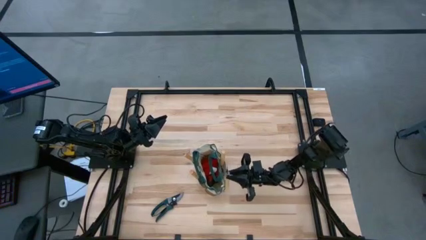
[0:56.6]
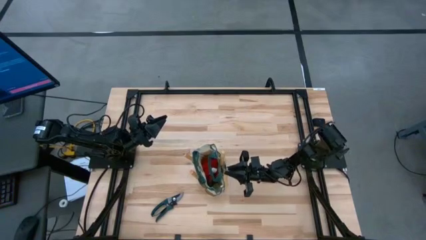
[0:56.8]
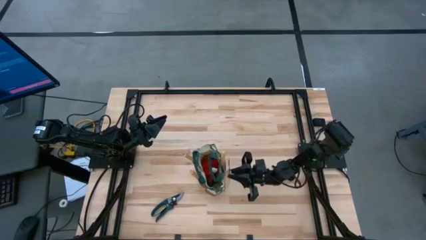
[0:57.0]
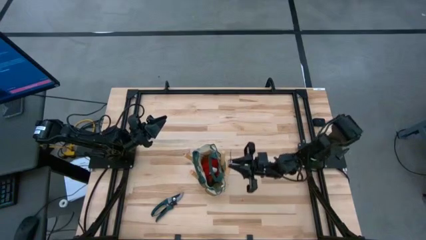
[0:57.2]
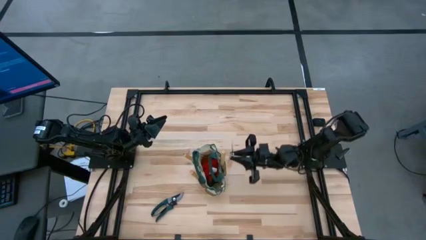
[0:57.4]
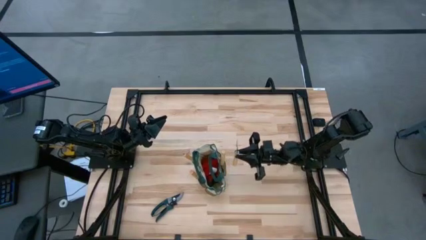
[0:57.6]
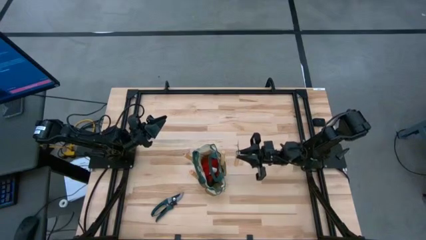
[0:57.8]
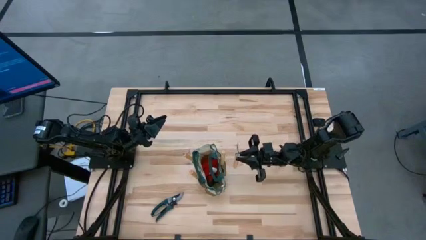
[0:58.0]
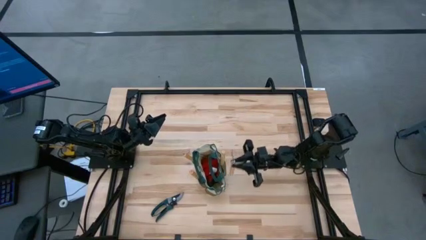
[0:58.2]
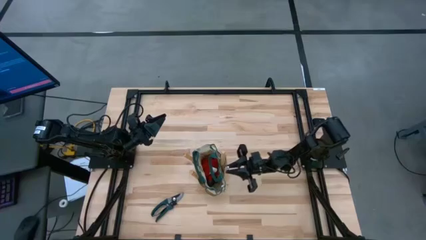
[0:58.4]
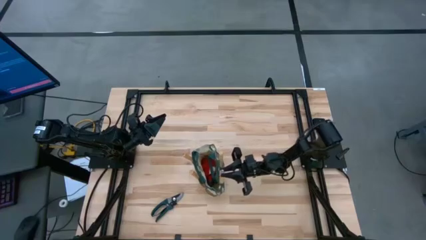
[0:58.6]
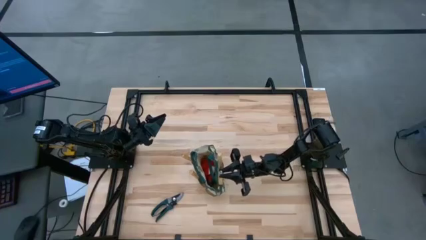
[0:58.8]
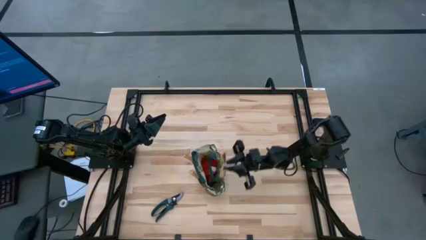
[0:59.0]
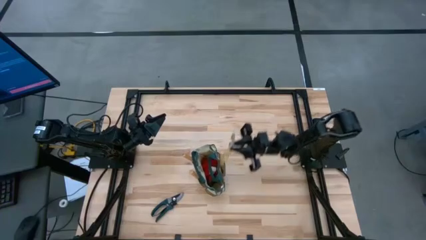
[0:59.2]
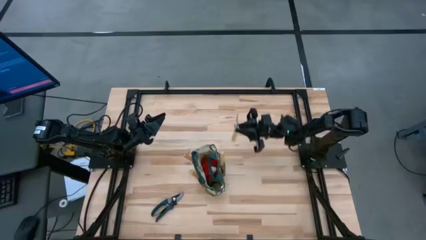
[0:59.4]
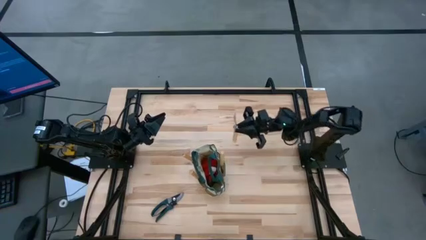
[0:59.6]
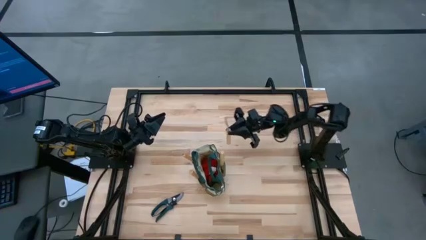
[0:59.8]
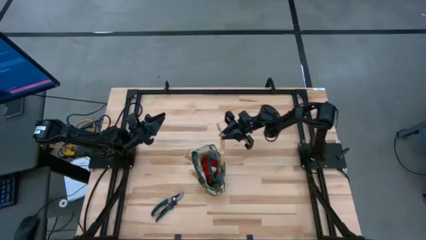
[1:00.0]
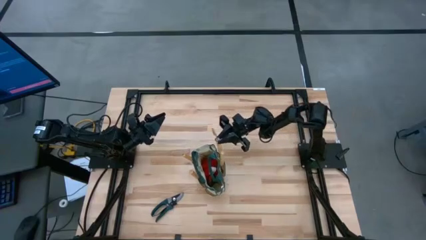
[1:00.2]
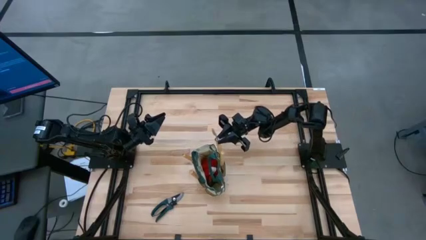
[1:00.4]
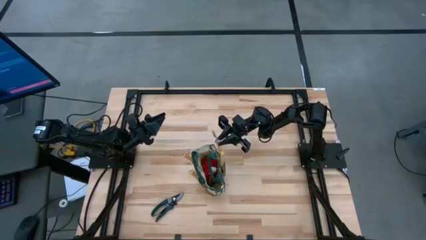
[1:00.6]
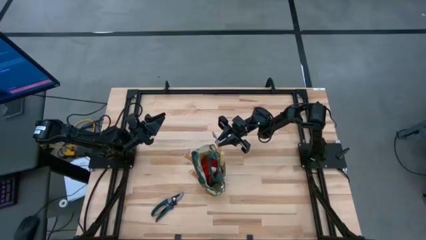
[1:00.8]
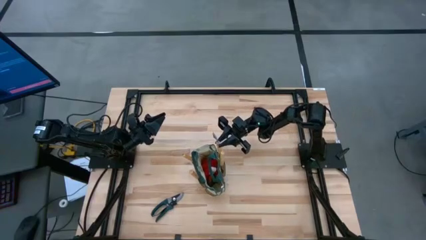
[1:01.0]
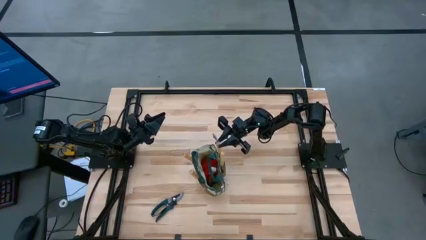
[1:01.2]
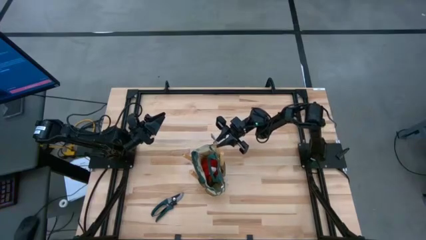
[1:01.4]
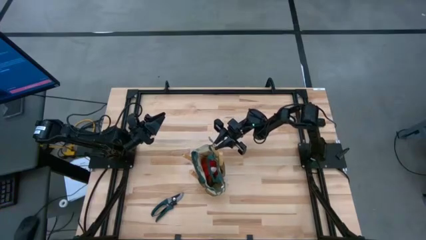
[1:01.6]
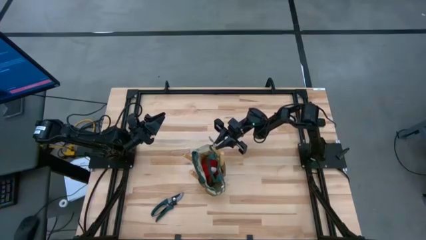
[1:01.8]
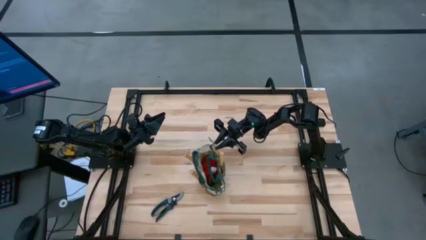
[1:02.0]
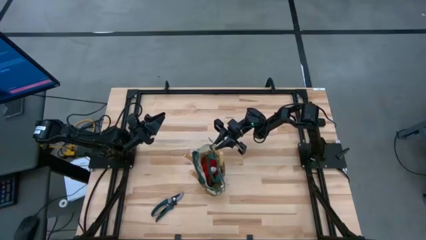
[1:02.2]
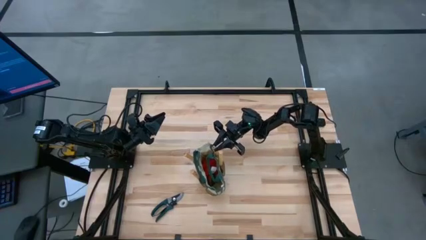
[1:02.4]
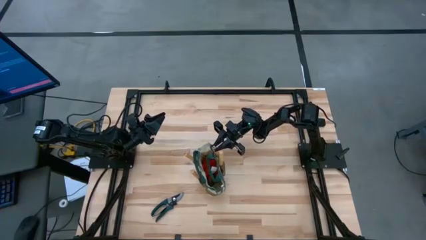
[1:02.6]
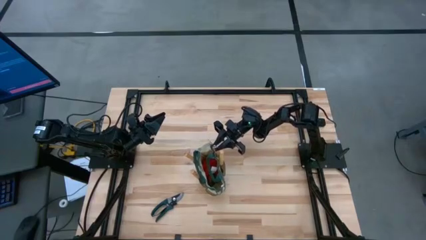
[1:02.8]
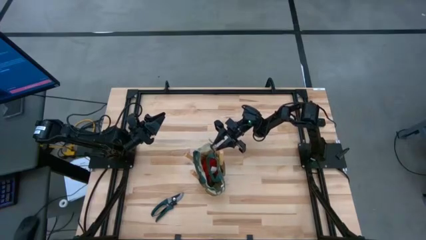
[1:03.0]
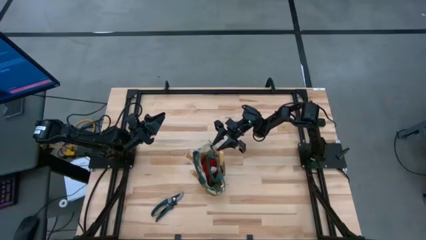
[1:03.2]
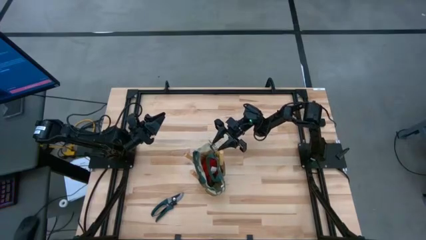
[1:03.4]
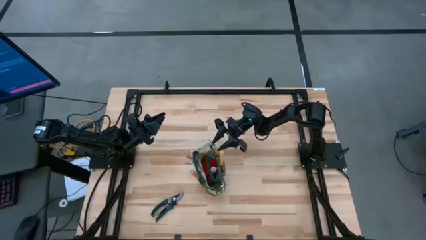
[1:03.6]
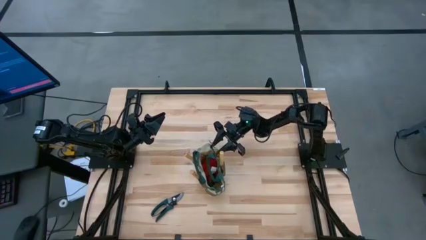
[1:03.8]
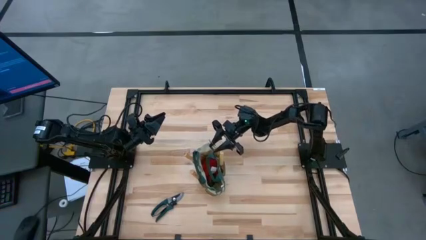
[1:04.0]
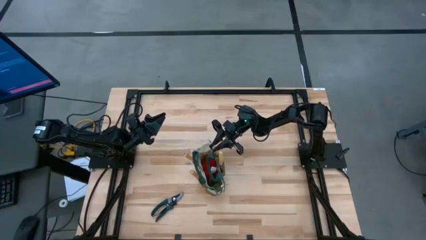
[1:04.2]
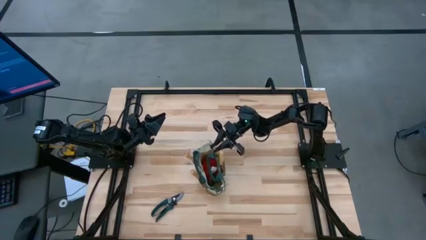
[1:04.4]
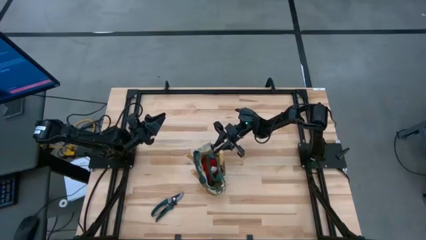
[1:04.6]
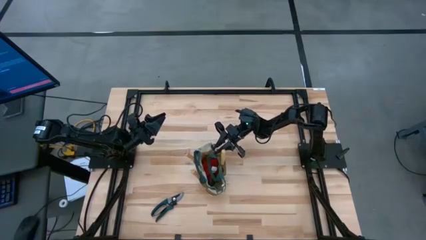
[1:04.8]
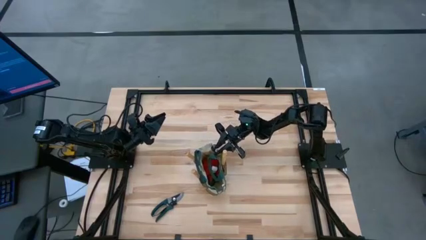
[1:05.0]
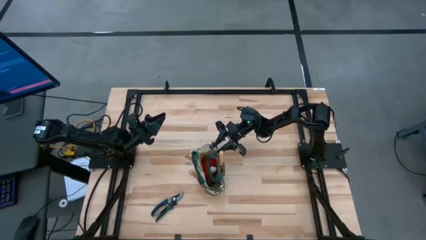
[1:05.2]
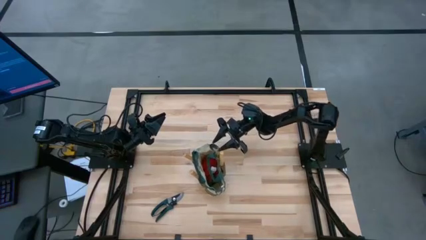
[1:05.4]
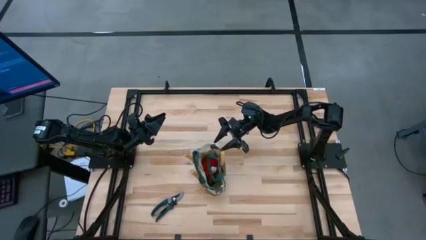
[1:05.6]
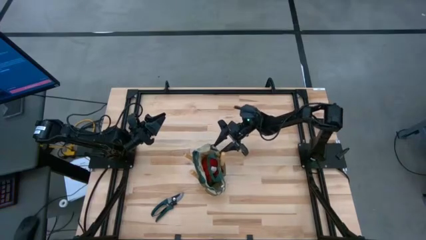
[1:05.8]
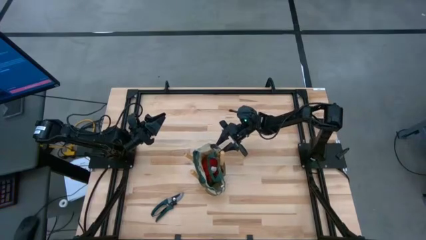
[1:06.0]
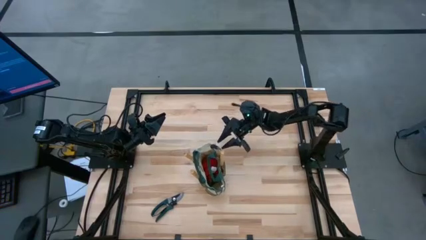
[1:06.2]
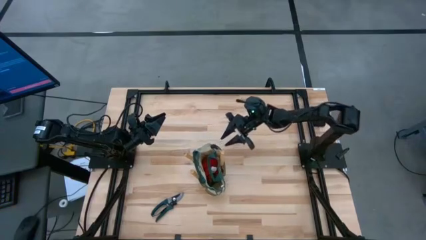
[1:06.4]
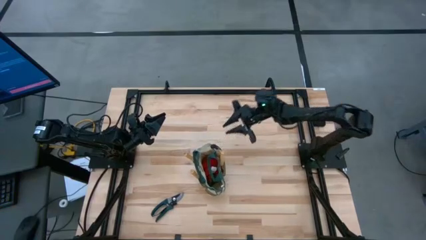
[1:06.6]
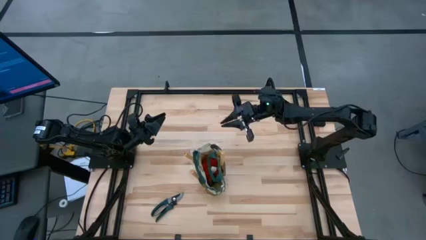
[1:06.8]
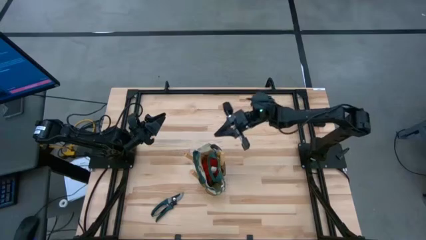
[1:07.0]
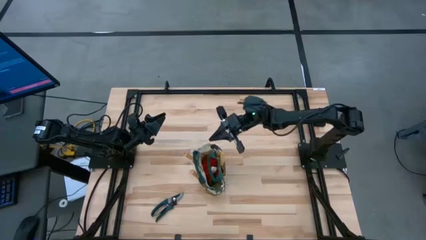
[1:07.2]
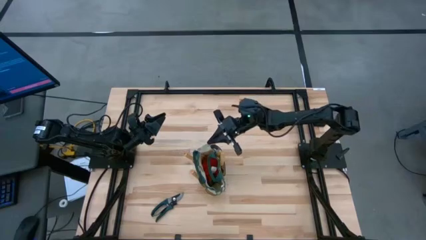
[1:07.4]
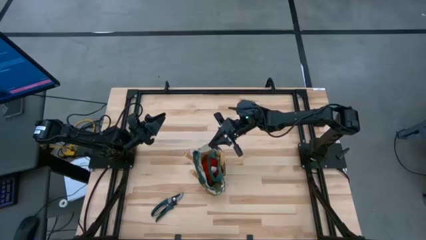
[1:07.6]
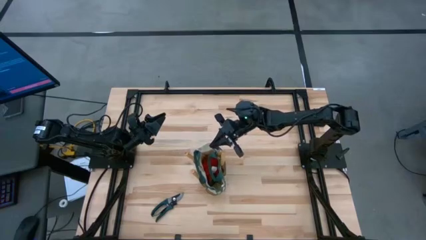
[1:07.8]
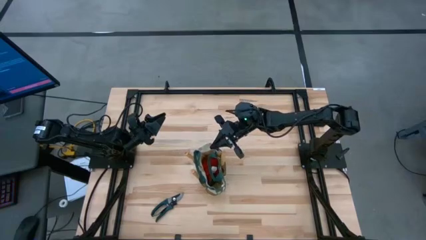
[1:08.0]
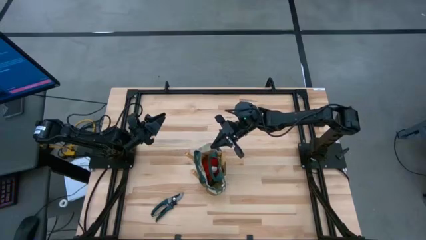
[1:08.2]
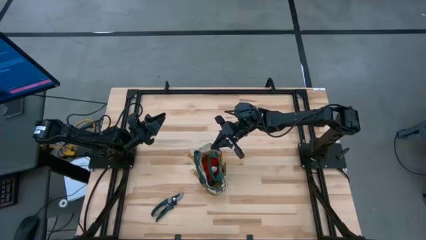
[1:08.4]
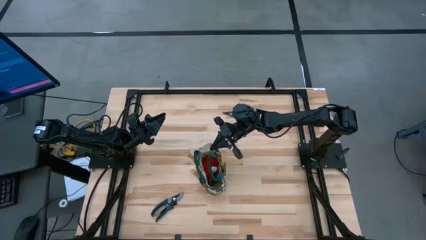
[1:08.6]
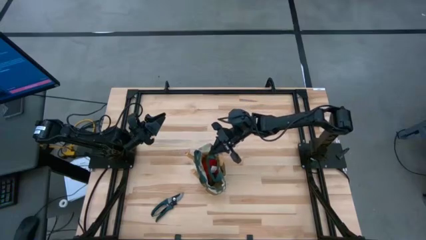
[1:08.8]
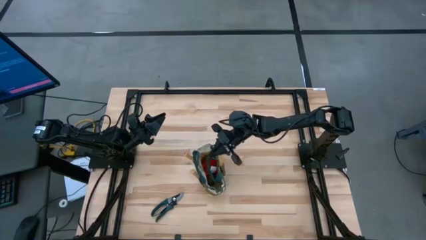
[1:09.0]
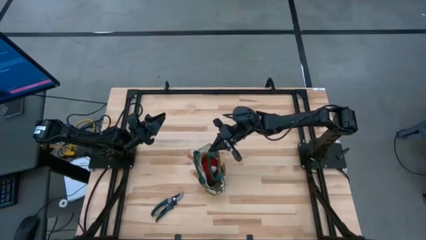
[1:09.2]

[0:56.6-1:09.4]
Task: Pick & Place Garden tools in Gardening bag
Put the trowel into the gardening bag
